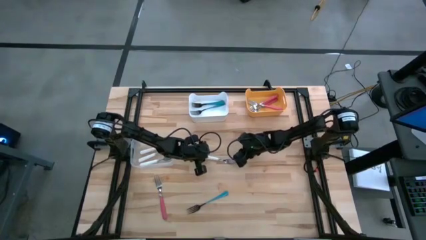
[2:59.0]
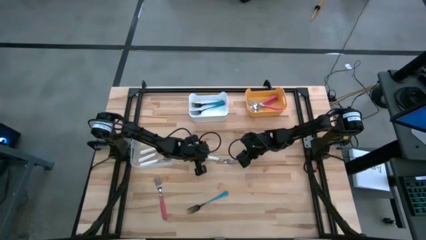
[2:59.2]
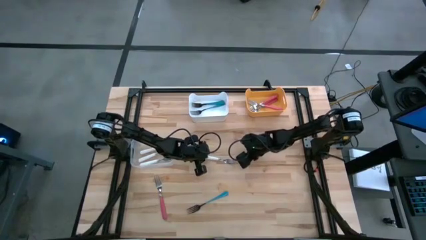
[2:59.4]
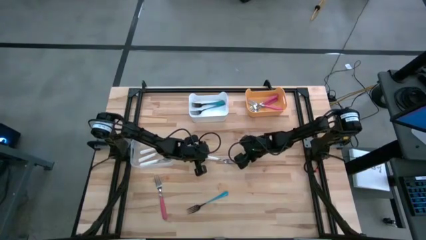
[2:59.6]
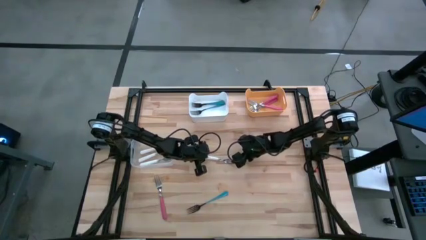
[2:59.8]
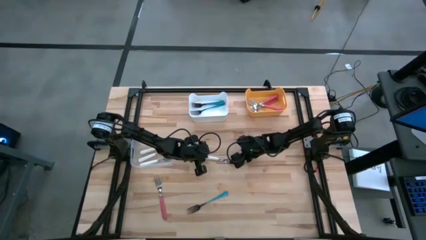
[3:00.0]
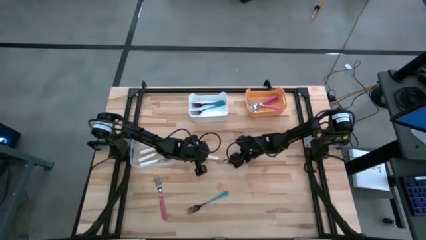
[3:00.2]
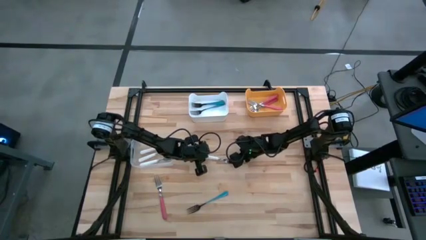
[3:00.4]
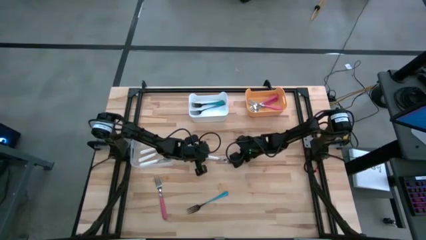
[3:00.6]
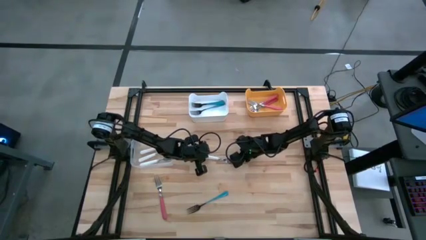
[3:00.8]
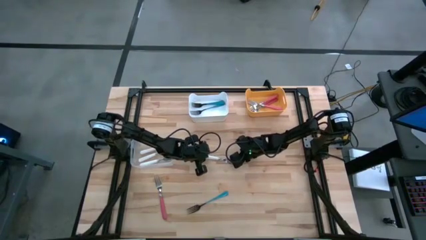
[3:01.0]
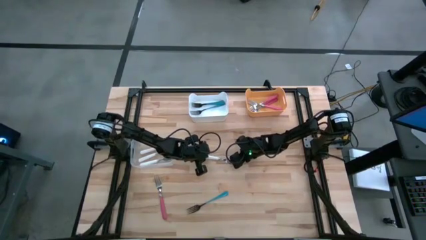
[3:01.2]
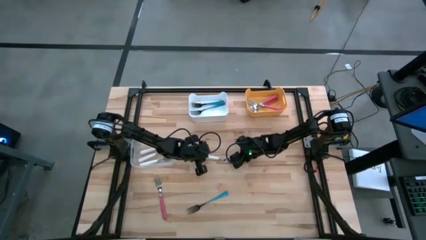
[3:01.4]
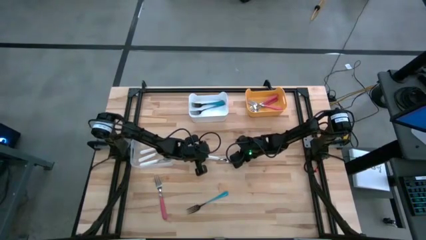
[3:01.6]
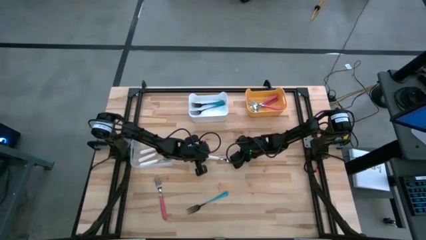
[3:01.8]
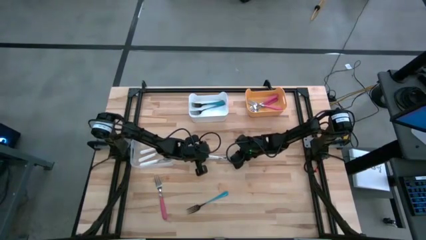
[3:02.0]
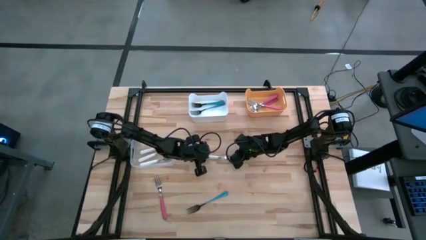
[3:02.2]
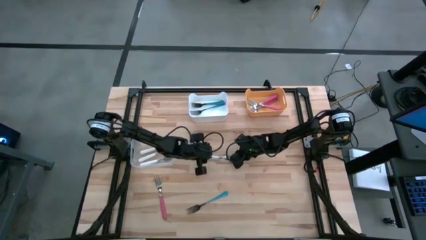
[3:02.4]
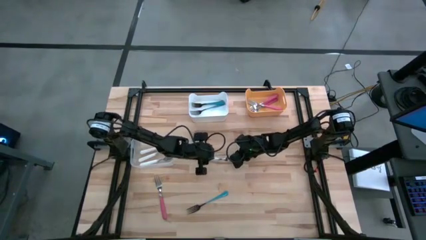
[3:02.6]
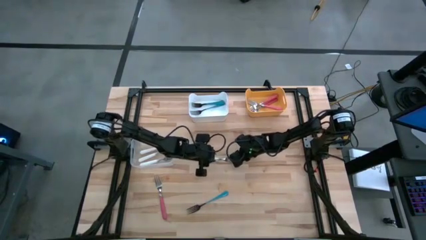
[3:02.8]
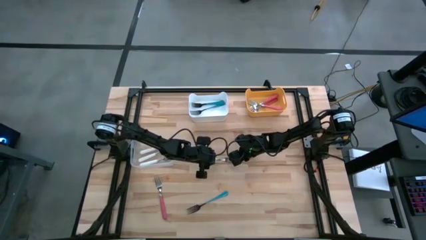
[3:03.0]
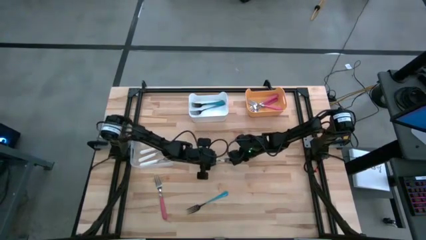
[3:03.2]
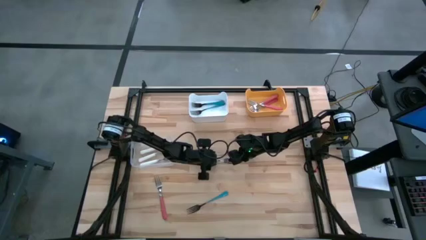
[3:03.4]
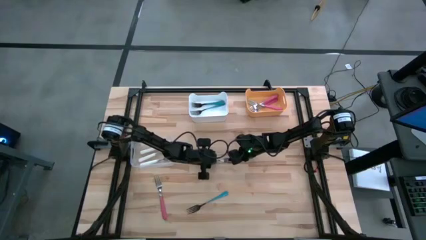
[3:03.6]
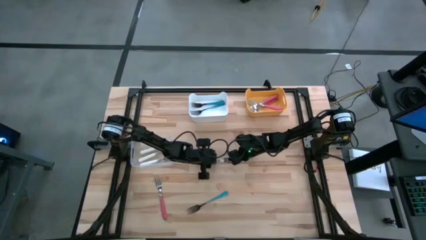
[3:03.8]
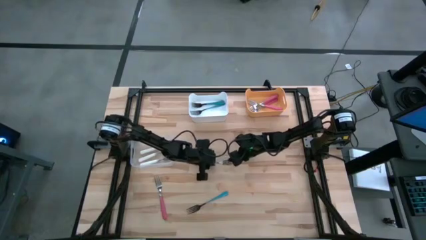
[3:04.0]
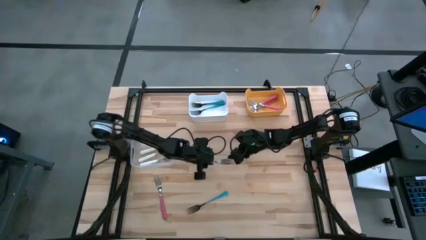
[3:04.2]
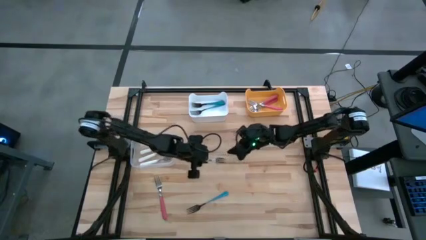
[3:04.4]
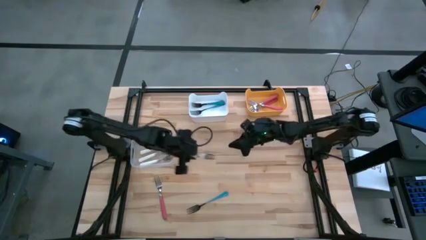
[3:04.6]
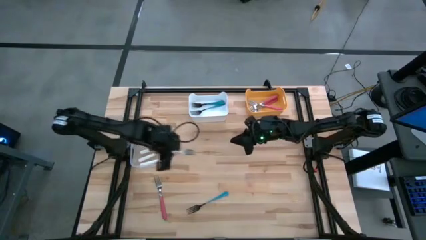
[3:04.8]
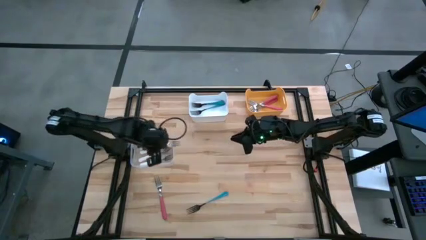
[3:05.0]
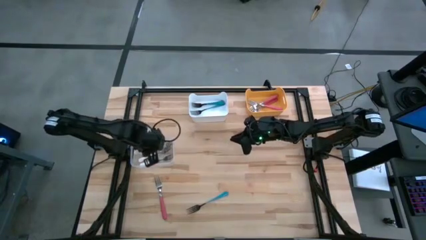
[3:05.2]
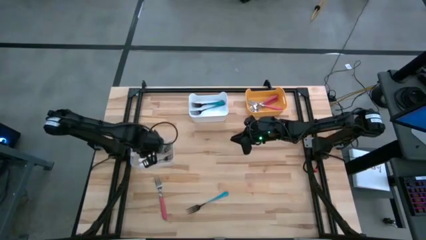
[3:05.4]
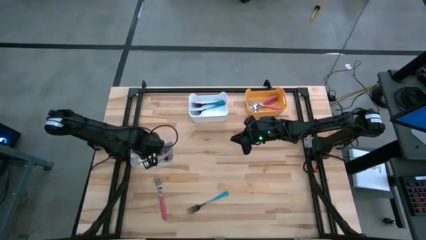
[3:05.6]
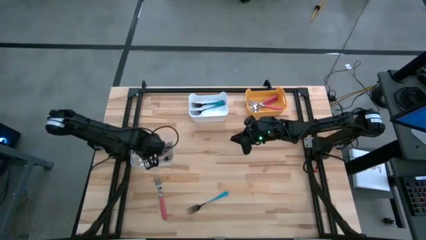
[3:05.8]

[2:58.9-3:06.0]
Task: Sort silverware by color (type)
Put the white fork into the transparent bin

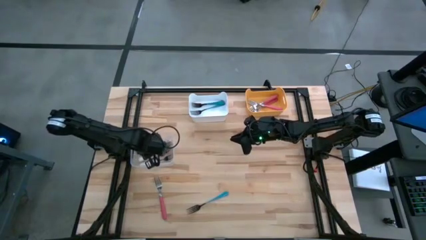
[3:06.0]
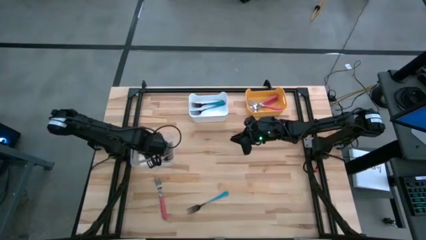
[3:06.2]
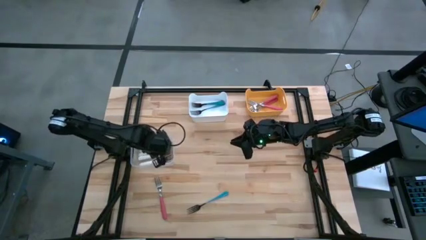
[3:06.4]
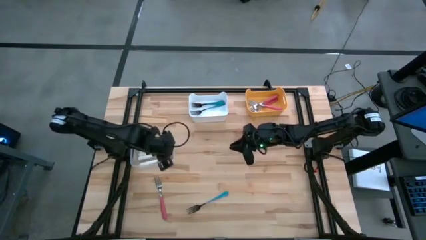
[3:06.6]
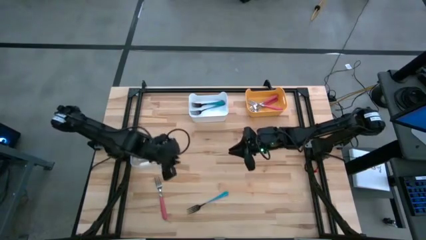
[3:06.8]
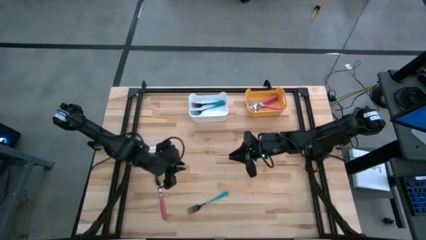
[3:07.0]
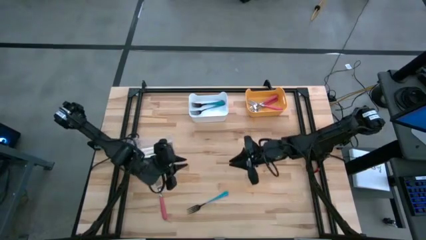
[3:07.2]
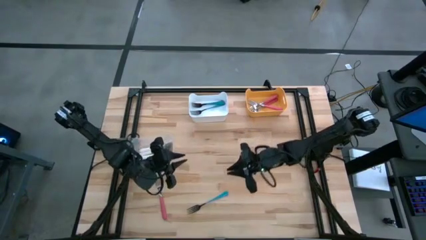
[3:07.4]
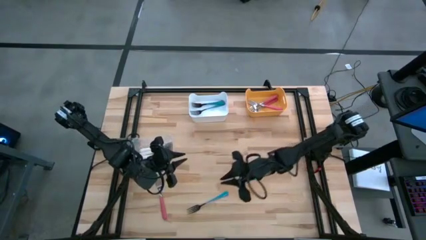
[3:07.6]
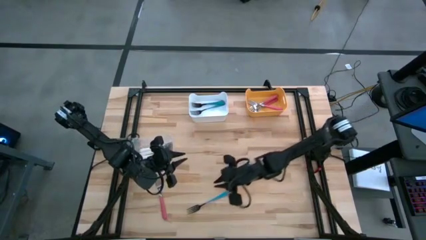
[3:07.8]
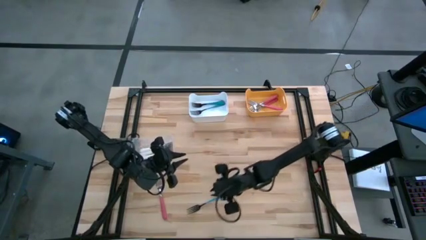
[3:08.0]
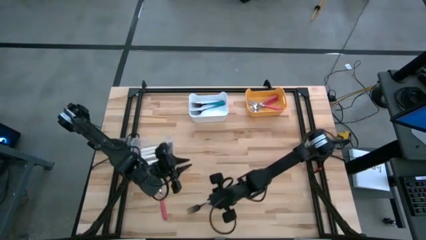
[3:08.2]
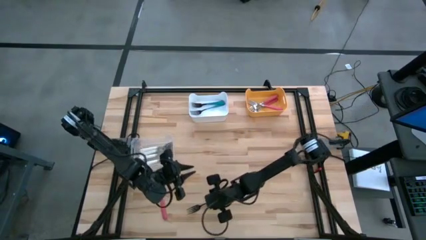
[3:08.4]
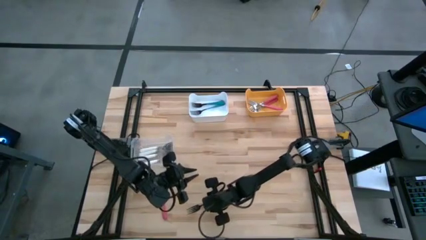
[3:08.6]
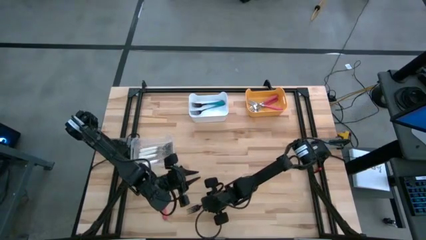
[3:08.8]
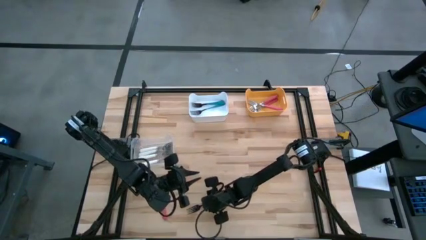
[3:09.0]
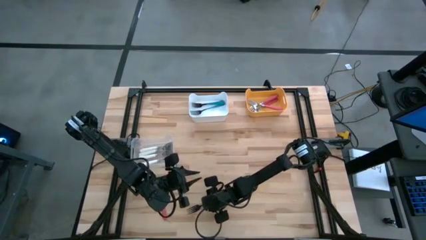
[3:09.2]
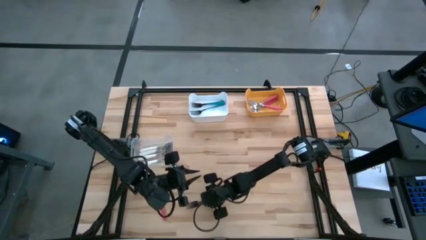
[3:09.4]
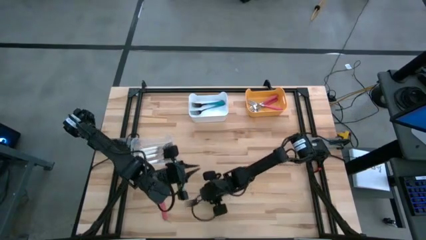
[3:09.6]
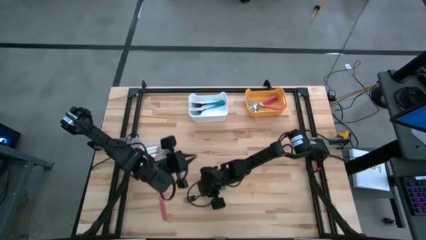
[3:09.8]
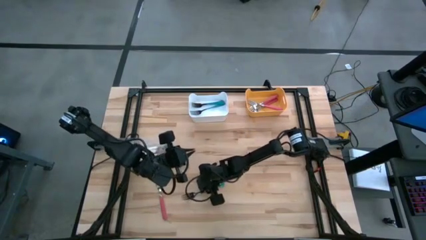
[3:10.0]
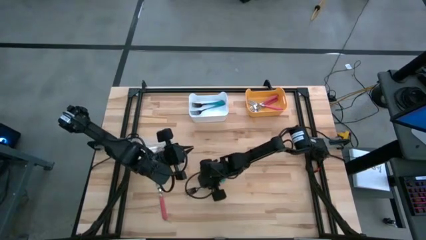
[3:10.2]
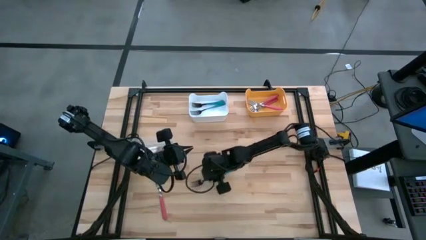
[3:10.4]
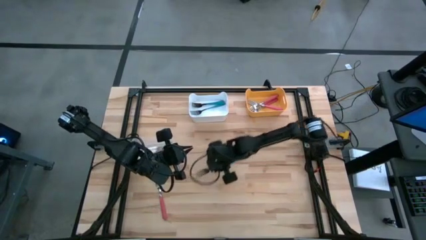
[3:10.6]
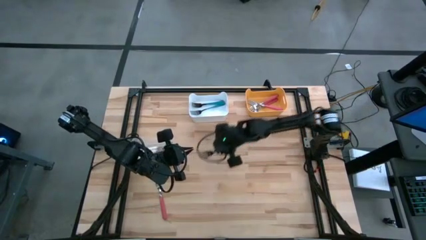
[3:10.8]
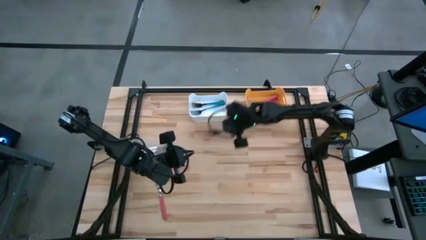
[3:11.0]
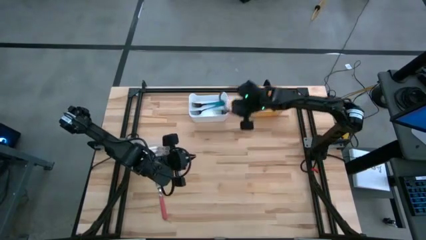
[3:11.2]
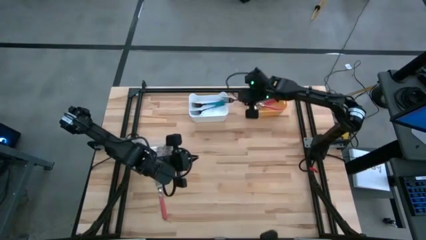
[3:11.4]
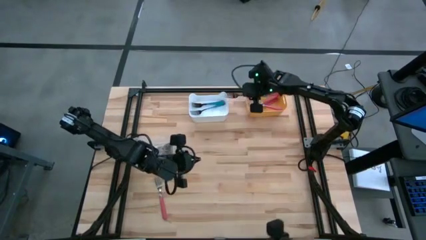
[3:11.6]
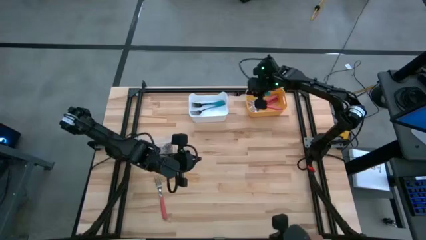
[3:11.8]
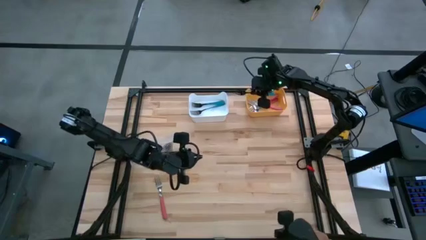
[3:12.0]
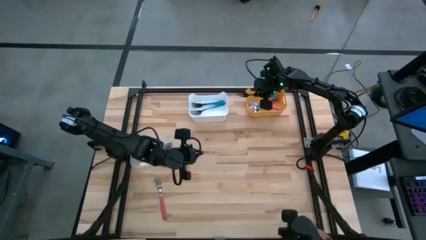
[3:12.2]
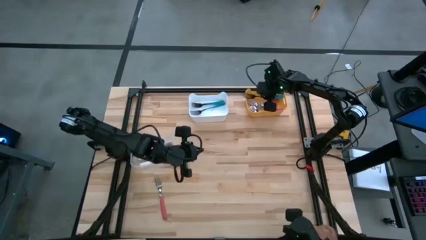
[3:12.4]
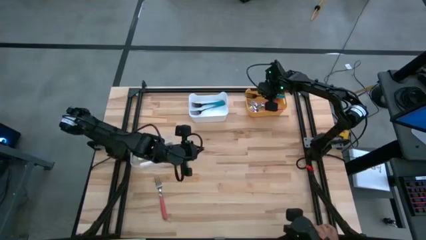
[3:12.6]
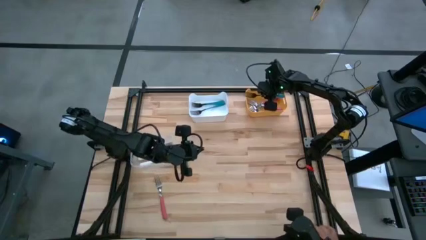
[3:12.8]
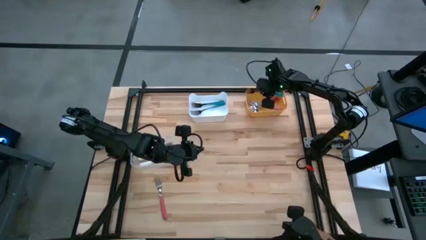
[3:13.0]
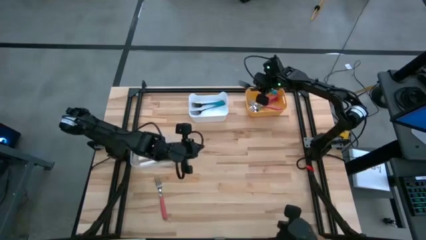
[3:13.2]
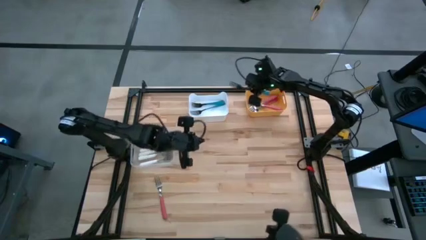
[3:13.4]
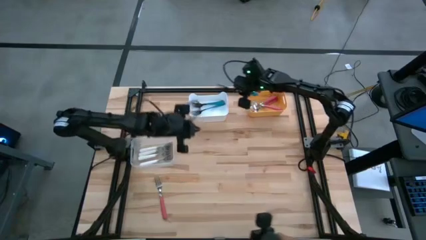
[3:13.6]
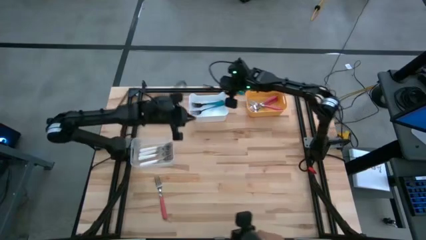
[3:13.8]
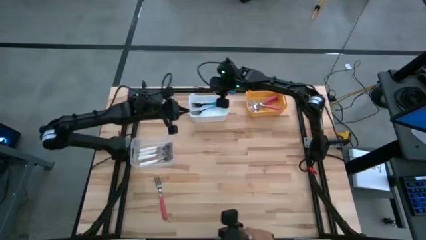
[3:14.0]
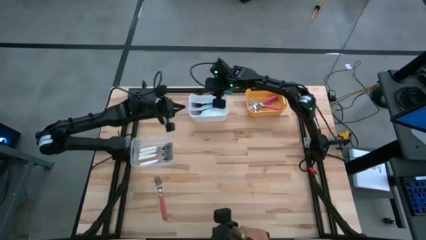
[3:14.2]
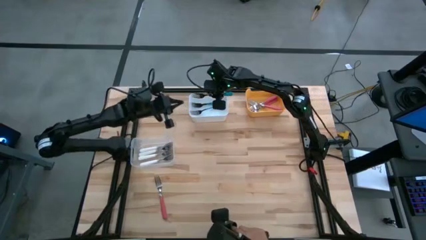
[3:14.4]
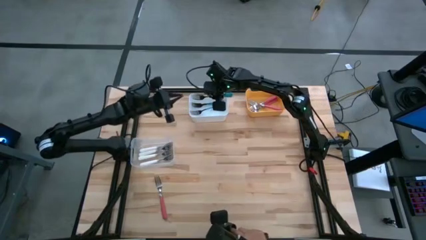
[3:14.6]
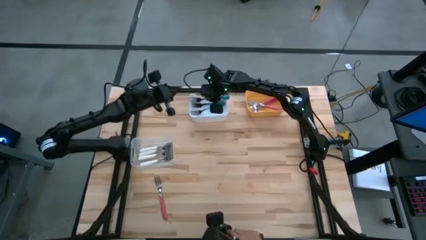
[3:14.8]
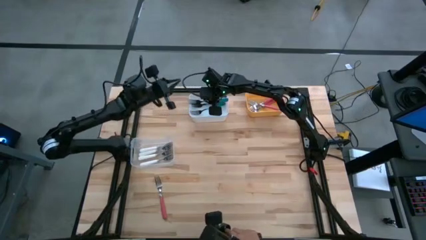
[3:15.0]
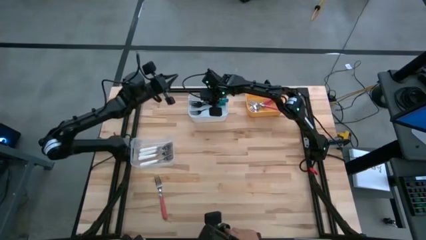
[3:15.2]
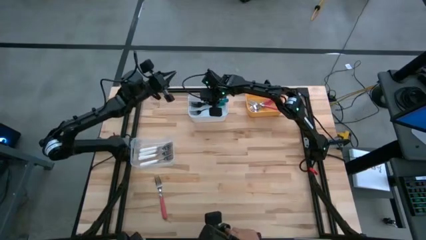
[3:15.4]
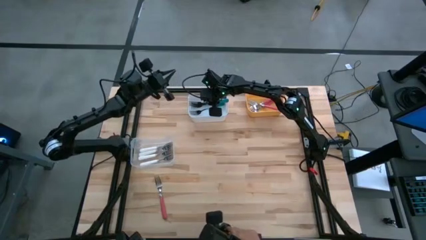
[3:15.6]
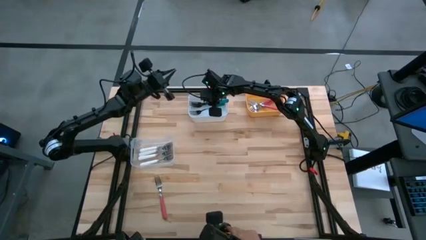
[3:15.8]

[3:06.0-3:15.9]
Put the blue fork into the white bin

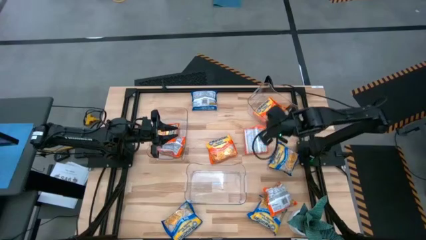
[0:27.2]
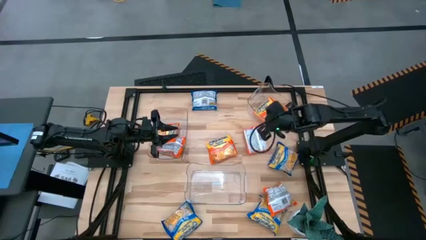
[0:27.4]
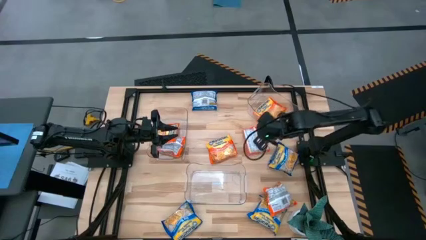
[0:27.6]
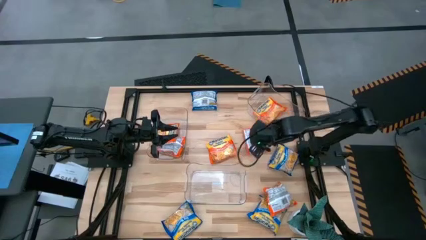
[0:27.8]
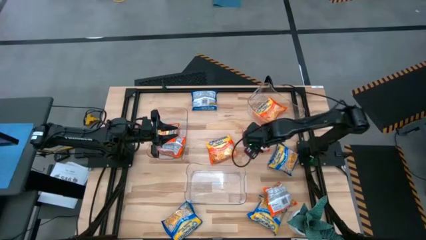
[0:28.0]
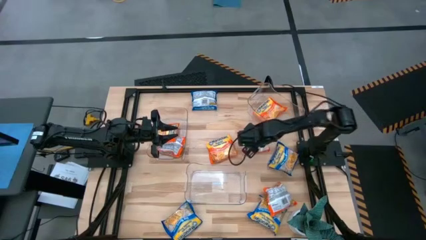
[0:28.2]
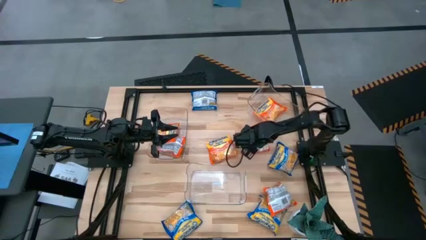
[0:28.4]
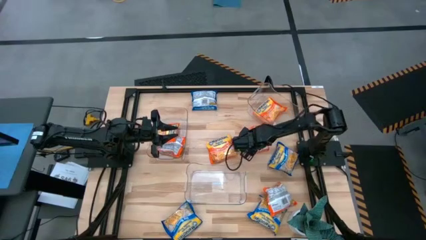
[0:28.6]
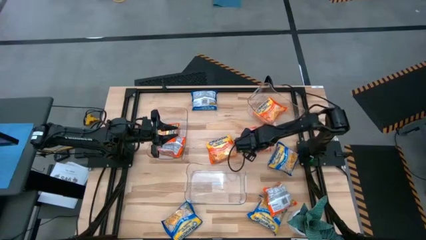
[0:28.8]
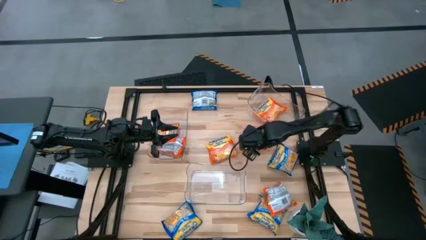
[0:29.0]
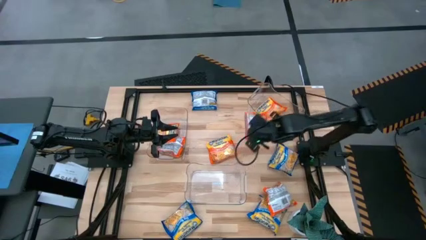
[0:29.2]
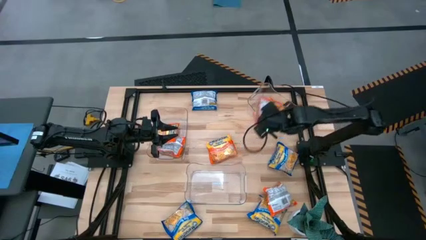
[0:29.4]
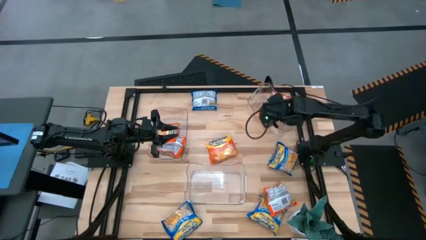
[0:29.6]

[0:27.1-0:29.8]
Task: Sort Maruchan noodles
Put the orange noodle pack into the top transparent bin
